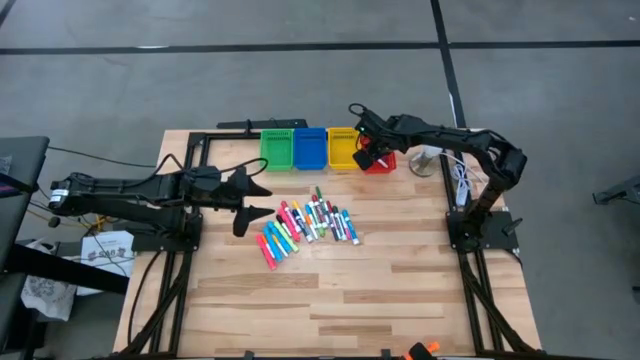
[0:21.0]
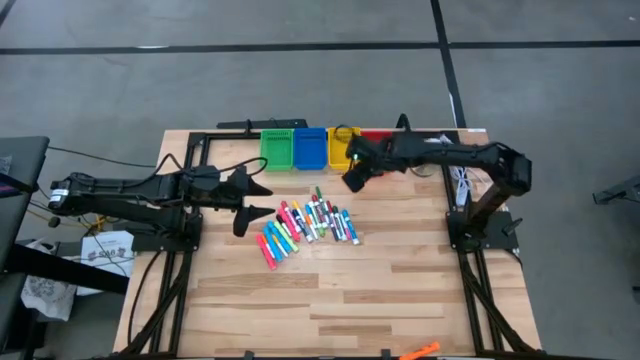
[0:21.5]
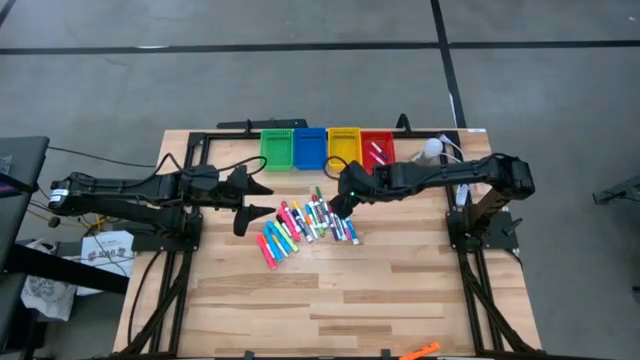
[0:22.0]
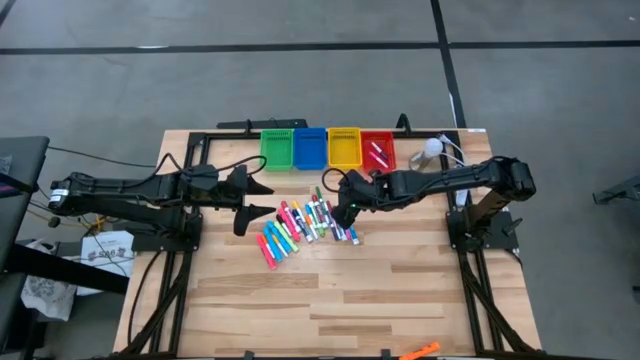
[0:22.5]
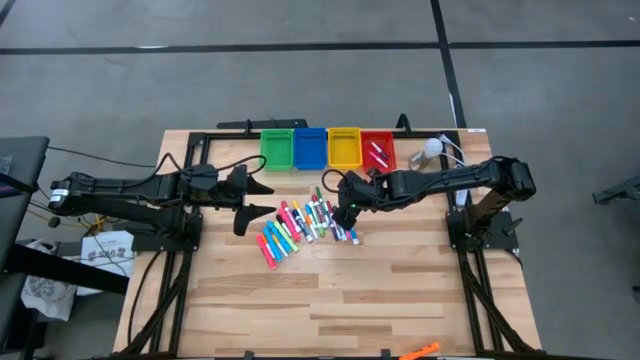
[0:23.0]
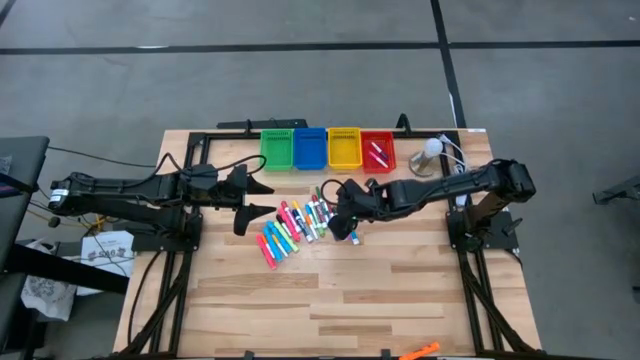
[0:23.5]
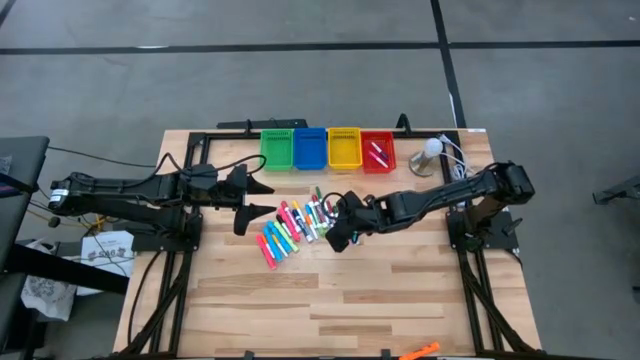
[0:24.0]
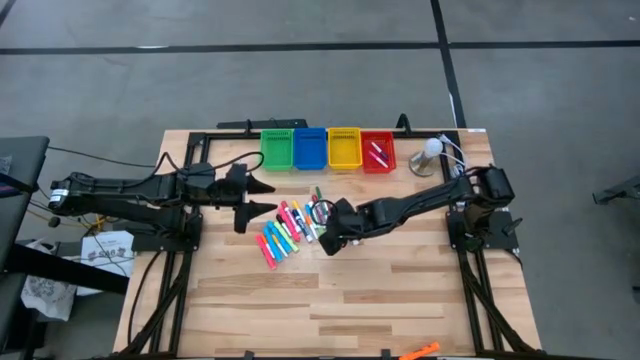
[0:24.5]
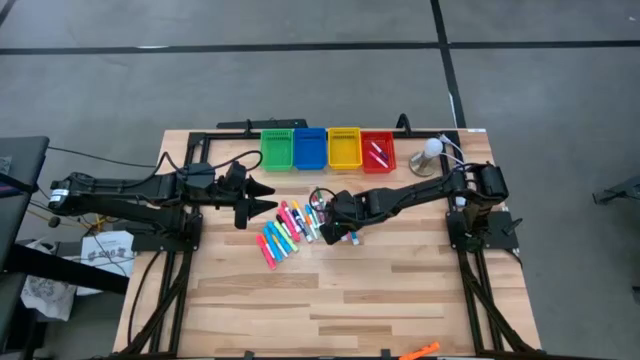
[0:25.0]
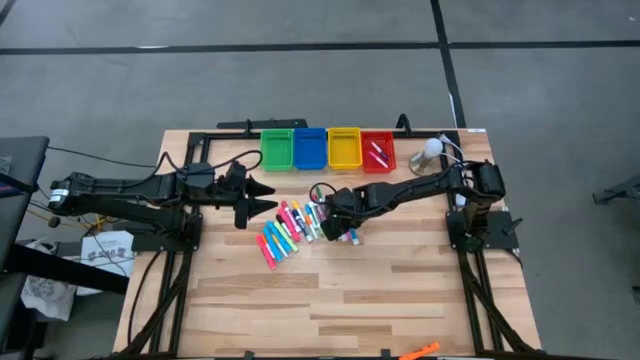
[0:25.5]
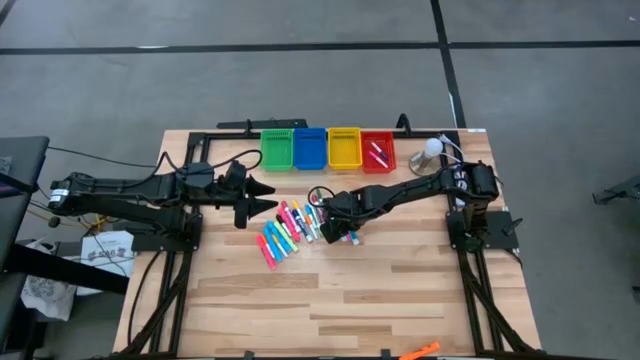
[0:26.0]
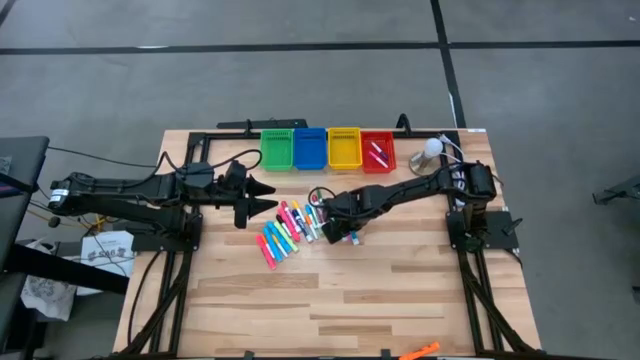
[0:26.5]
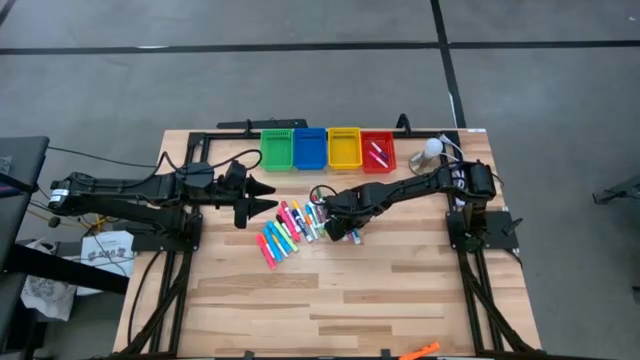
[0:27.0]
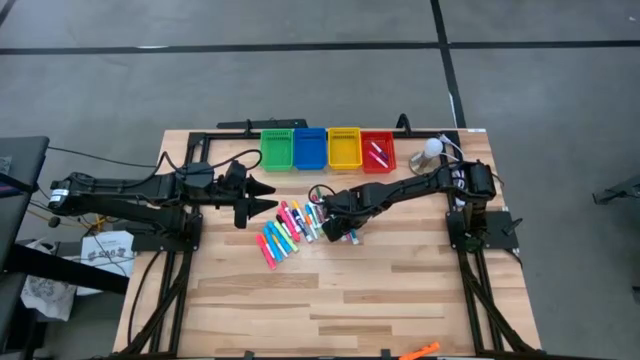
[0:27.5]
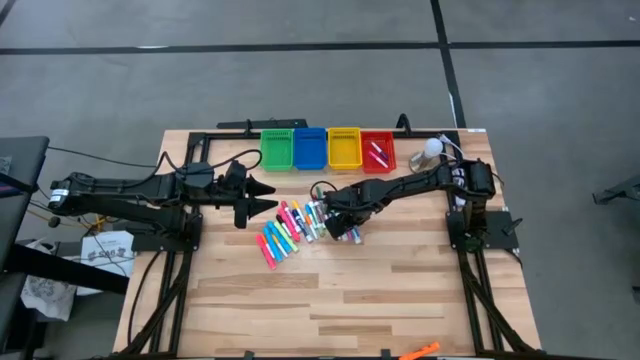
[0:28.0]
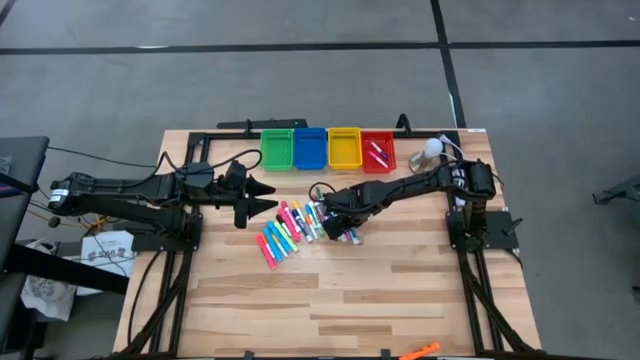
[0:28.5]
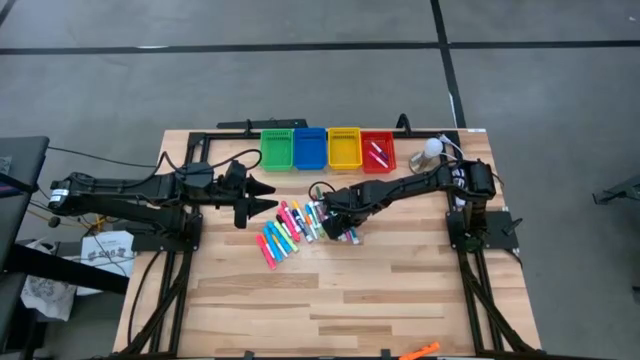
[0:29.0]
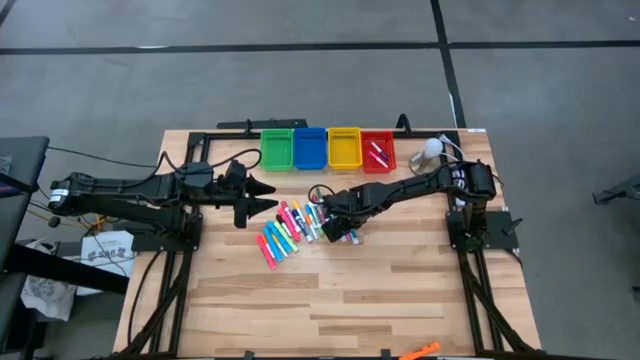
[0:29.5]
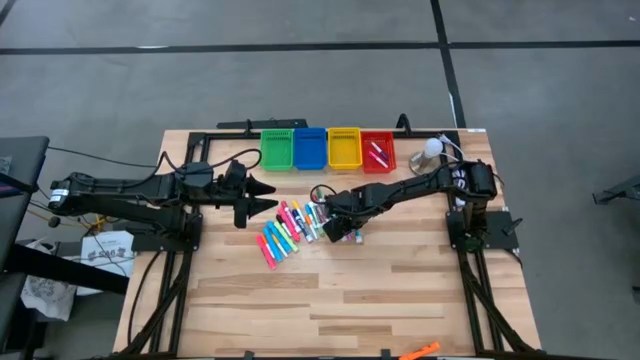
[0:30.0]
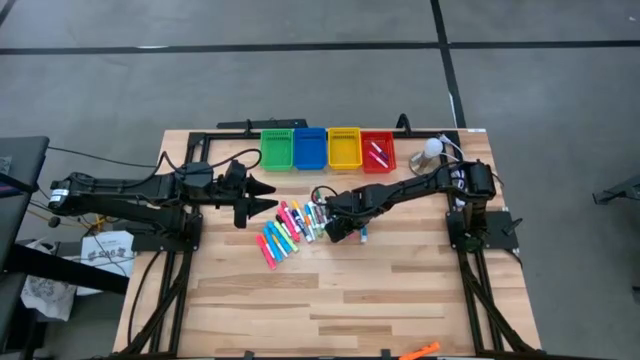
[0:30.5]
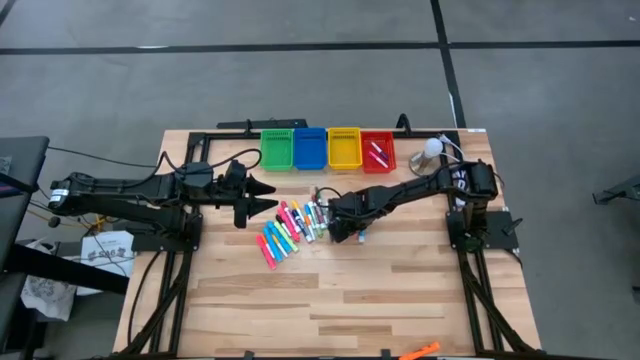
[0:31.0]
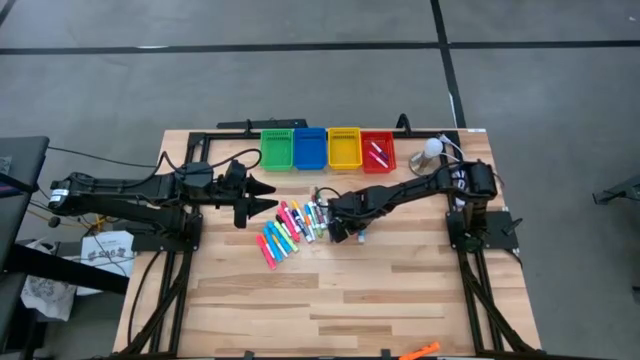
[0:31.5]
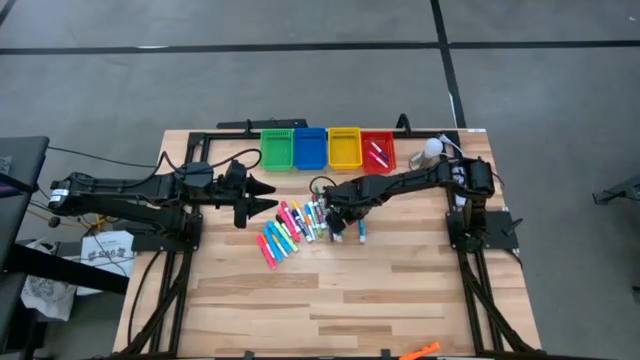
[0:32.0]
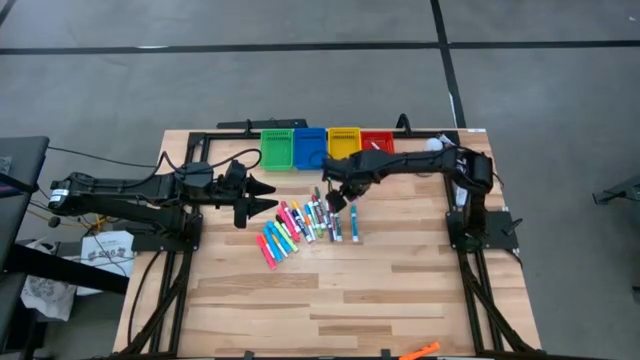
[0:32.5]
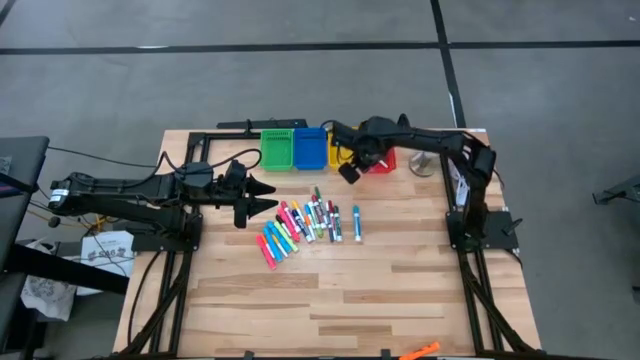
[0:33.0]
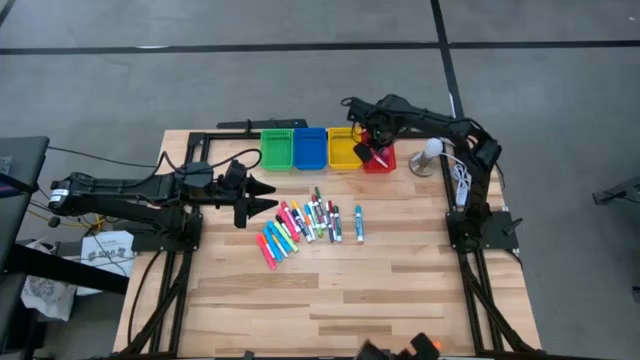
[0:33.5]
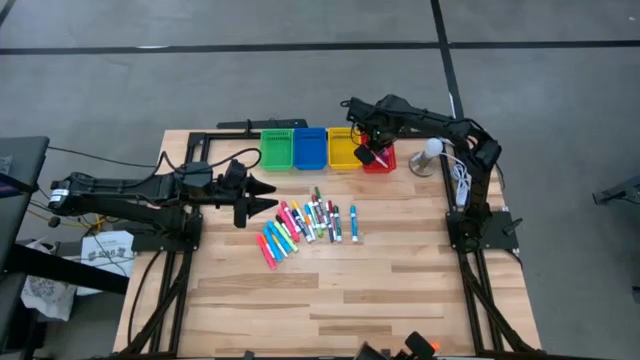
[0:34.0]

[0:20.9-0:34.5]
Task: Pick & Place Markers
Put the pink mini marker into the red basket

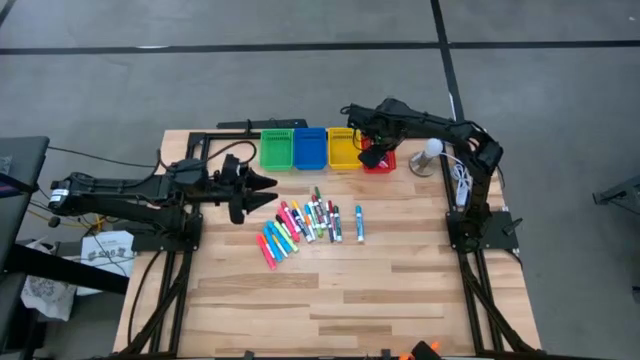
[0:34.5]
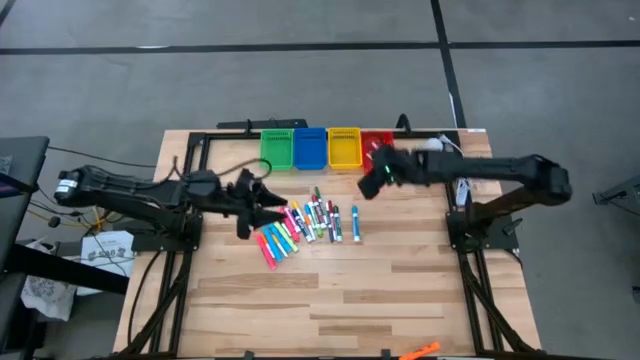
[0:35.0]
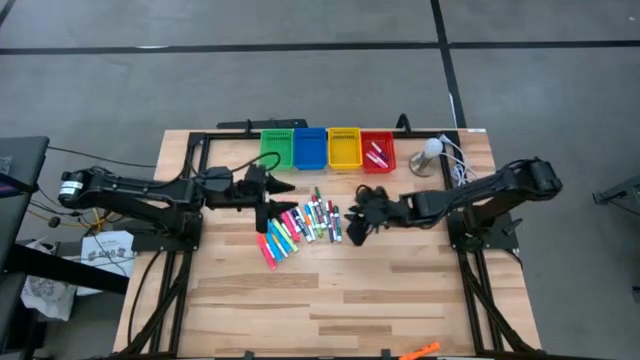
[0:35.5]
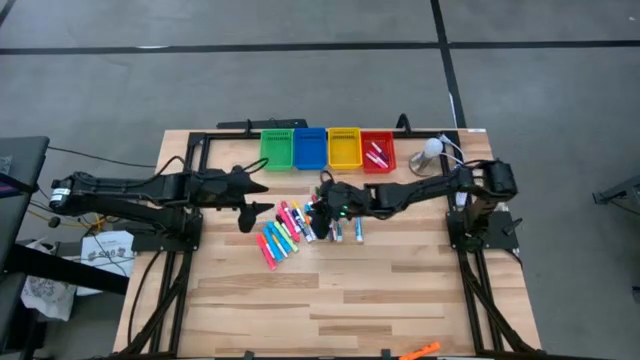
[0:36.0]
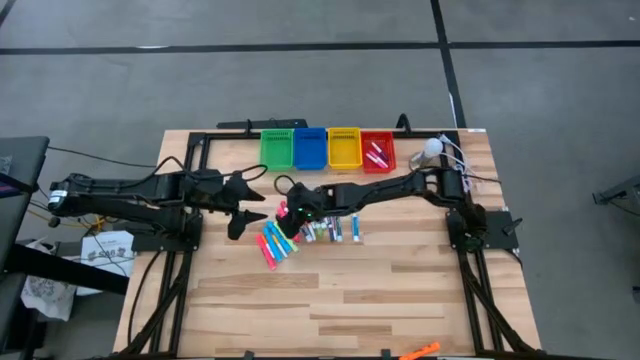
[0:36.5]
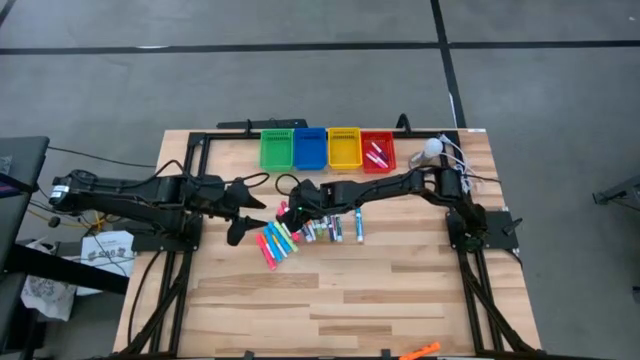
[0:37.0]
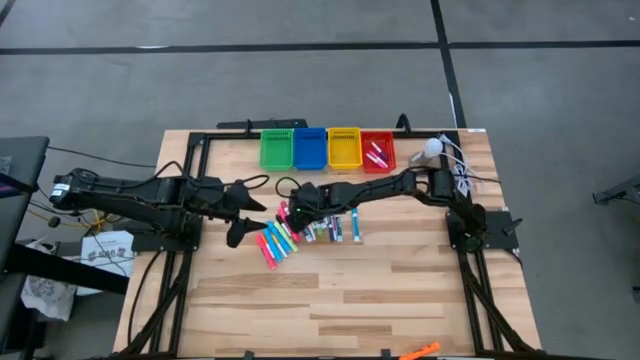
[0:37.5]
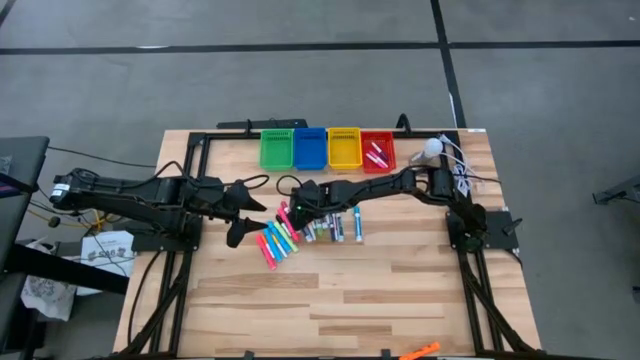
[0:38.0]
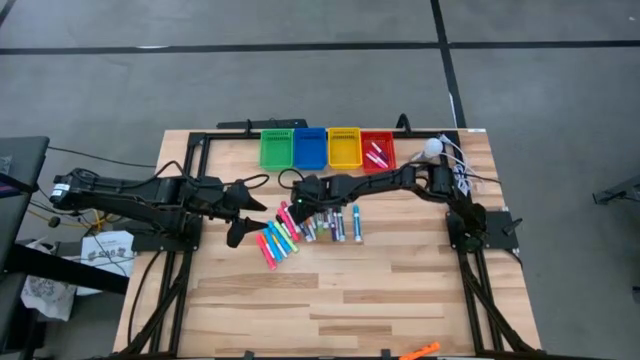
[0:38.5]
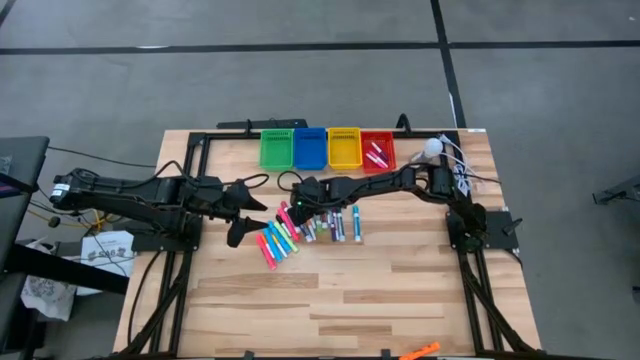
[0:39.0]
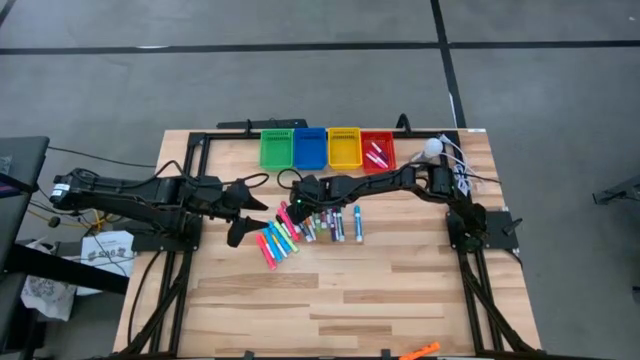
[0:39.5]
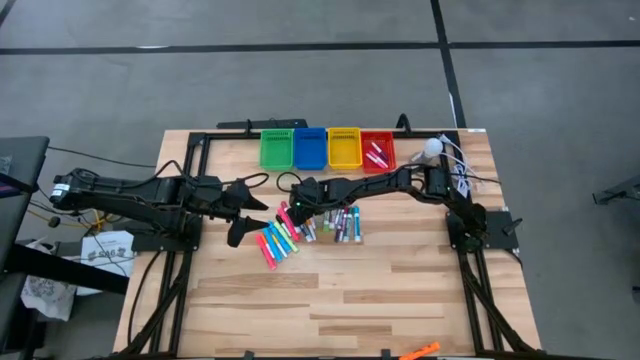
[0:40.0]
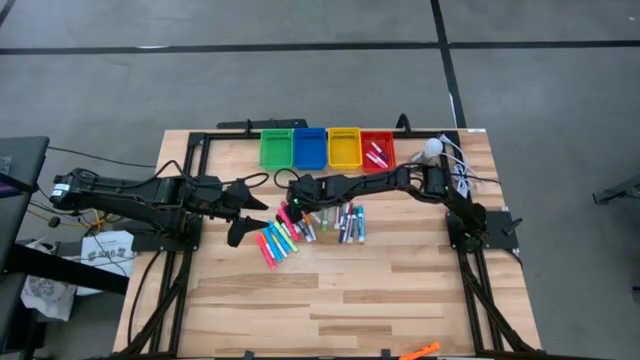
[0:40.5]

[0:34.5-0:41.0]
Put the blue mini marker into the red basket

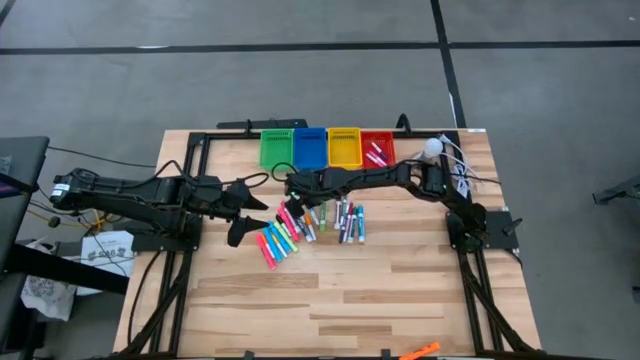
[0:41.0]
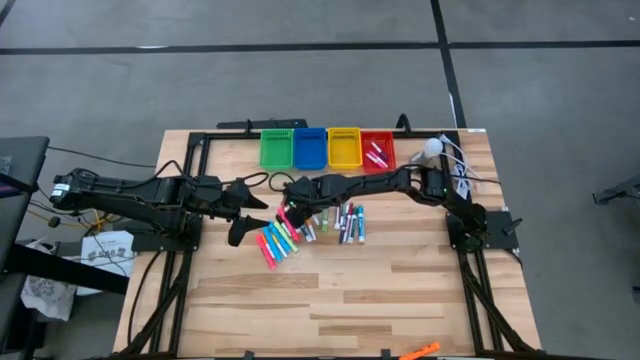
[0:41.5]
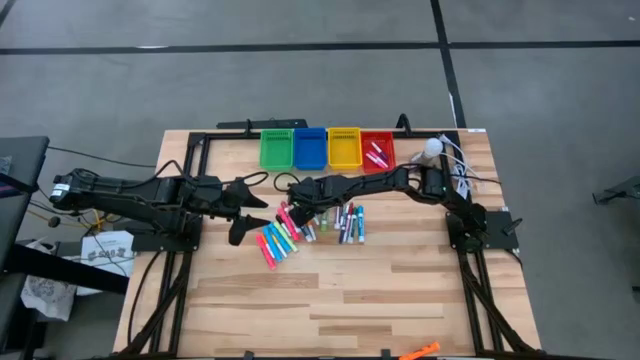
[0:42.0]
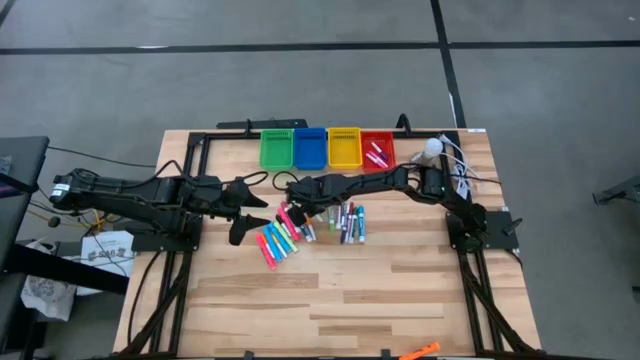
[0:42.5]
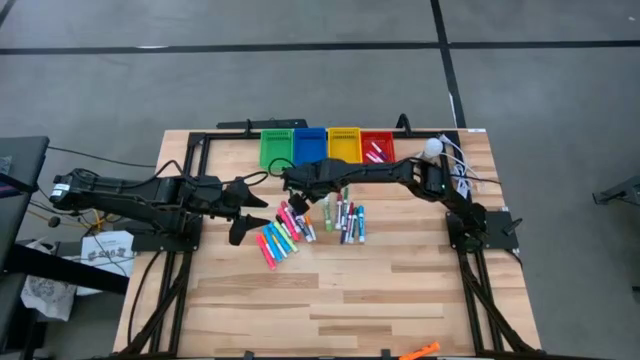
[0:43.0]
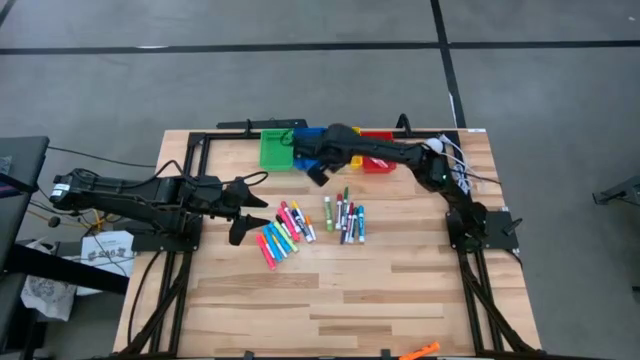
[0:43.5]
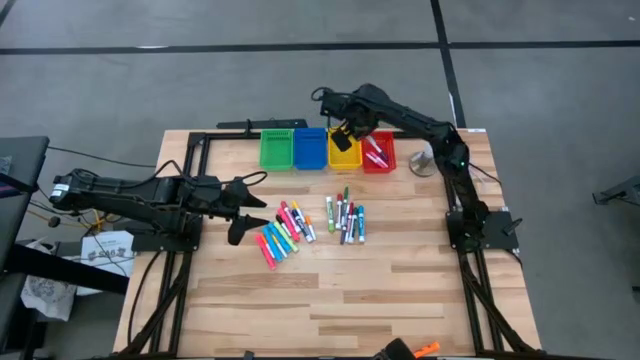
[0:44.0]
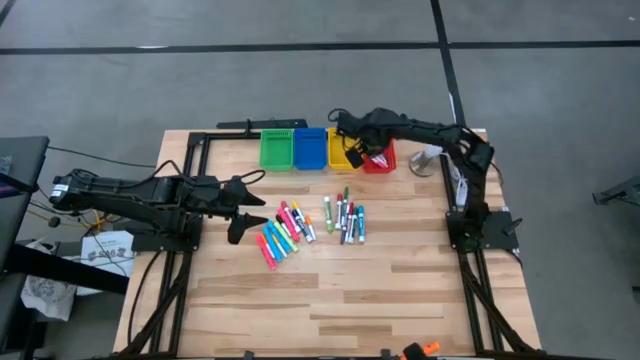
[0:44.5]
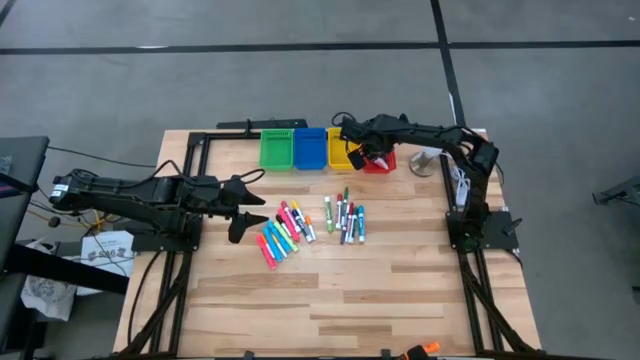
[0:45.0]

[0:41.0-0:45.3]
Put the blue mini marker into the red basket
